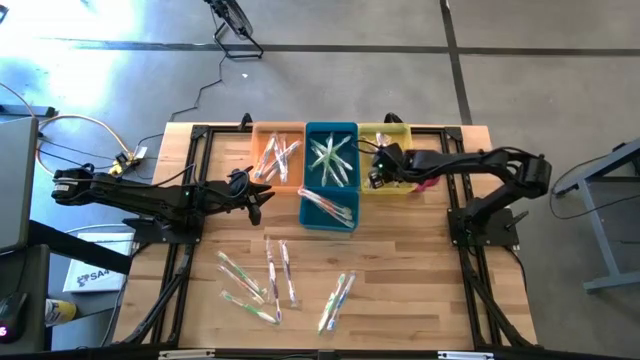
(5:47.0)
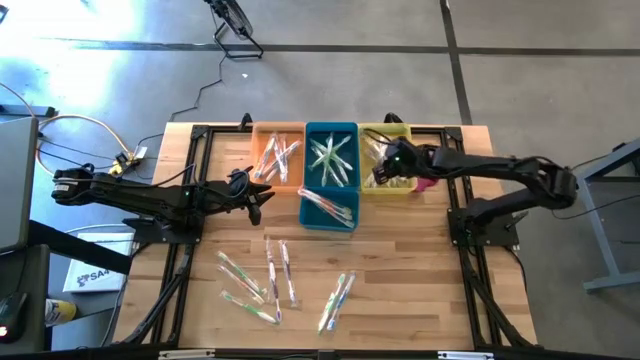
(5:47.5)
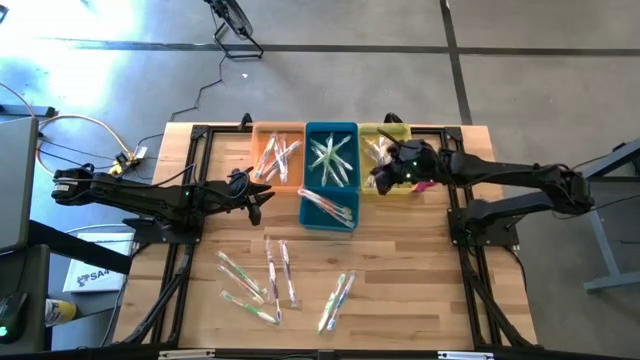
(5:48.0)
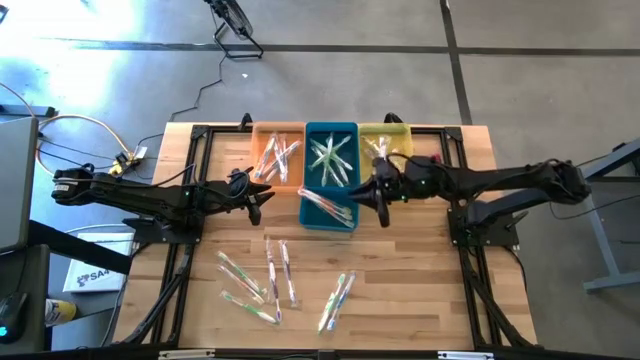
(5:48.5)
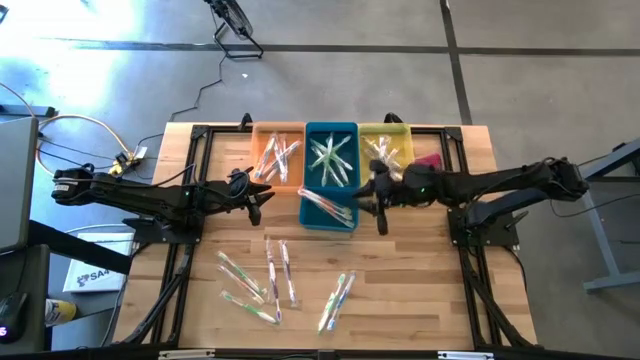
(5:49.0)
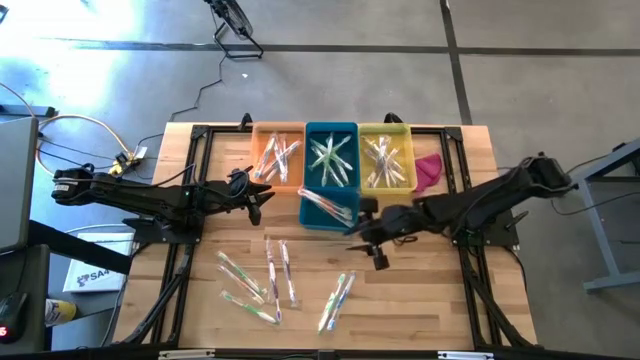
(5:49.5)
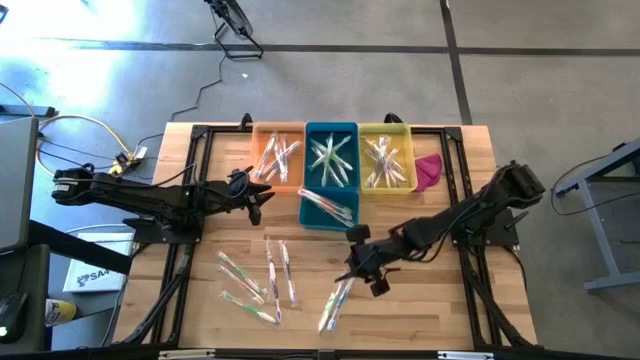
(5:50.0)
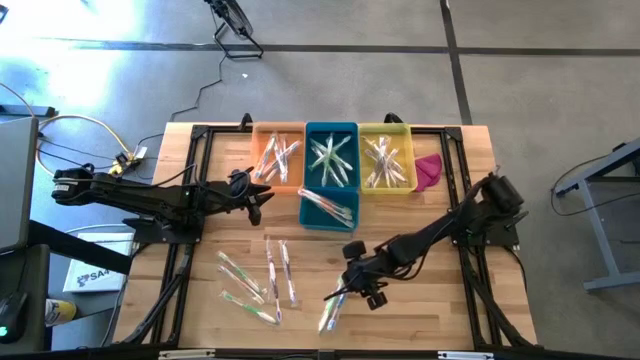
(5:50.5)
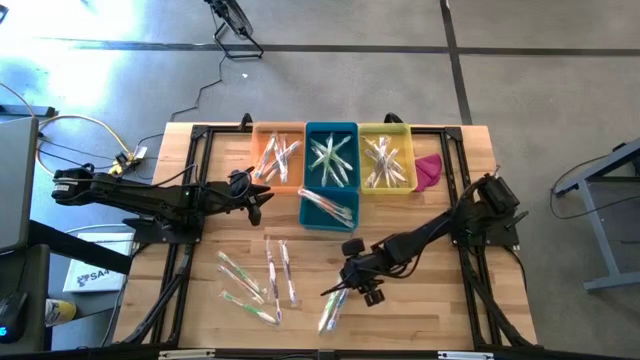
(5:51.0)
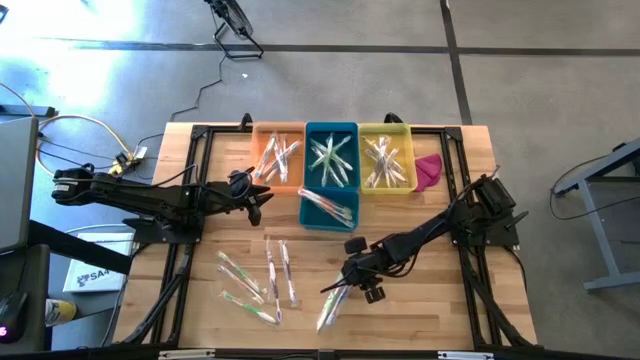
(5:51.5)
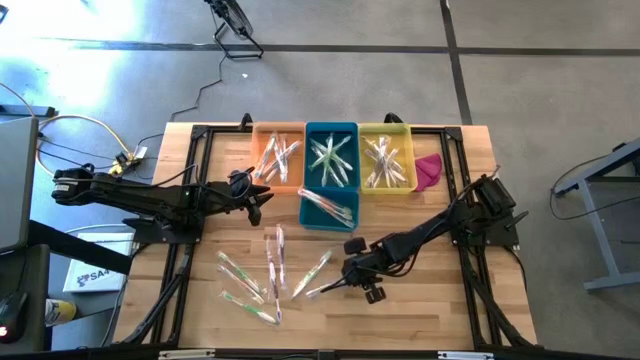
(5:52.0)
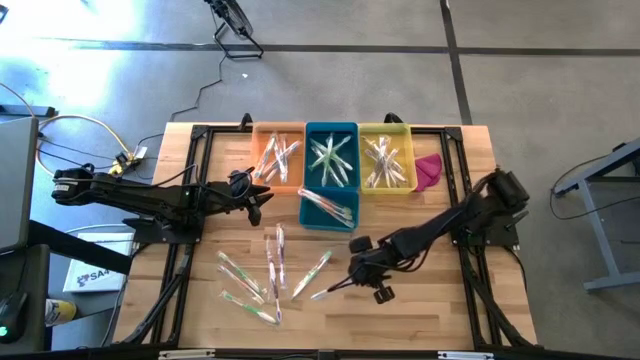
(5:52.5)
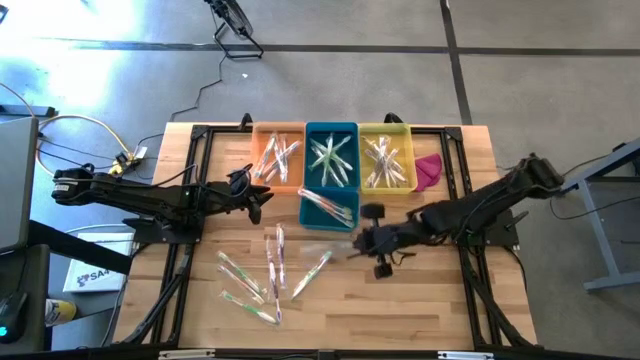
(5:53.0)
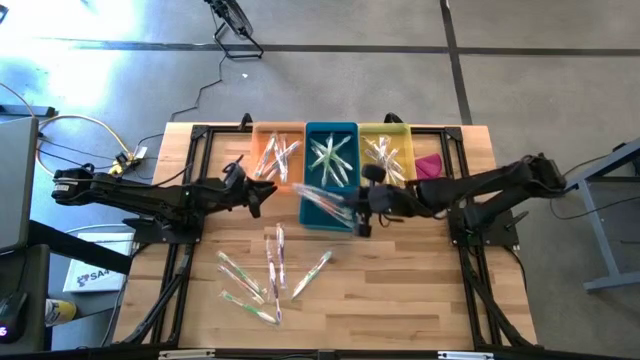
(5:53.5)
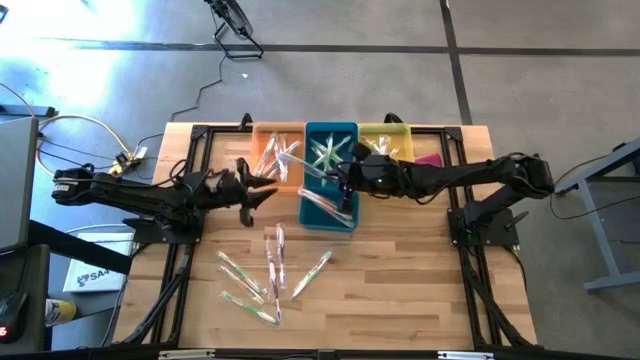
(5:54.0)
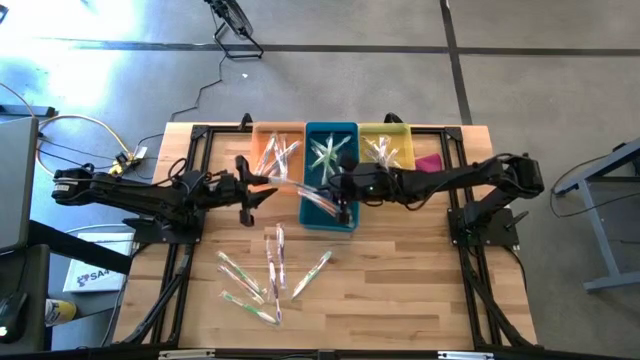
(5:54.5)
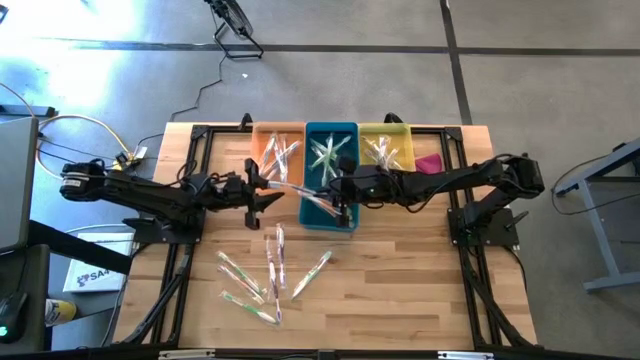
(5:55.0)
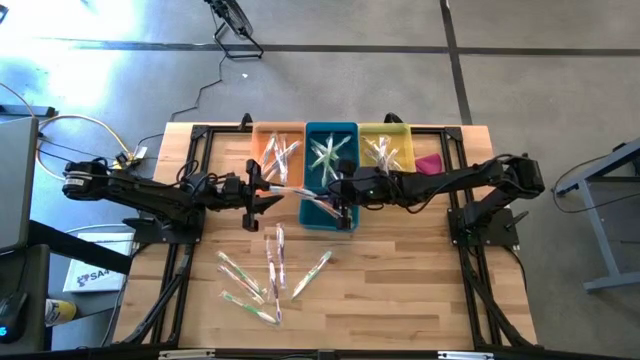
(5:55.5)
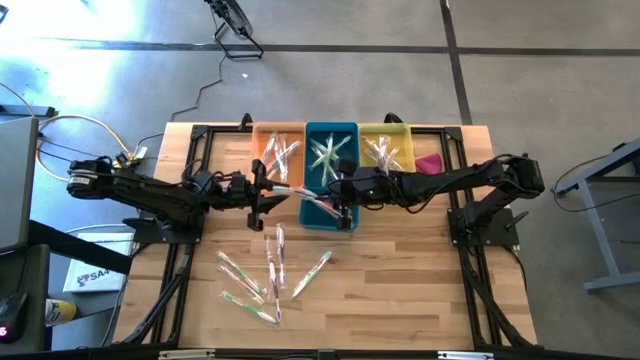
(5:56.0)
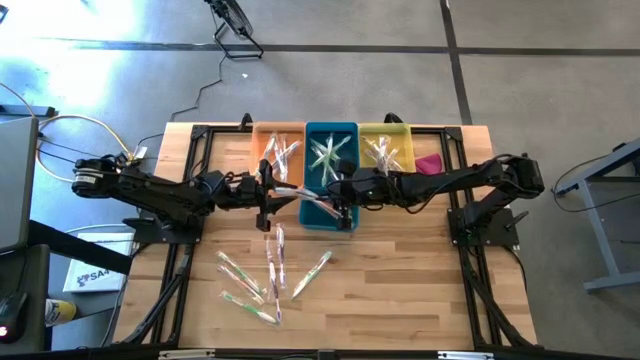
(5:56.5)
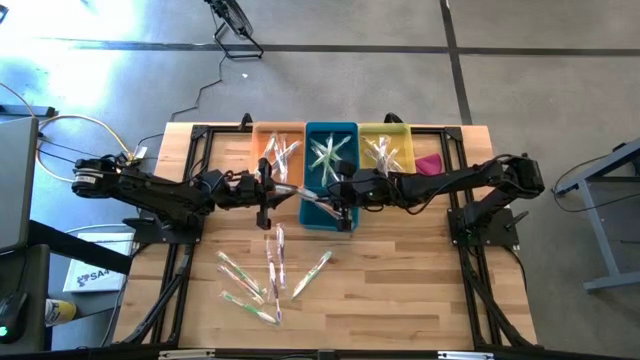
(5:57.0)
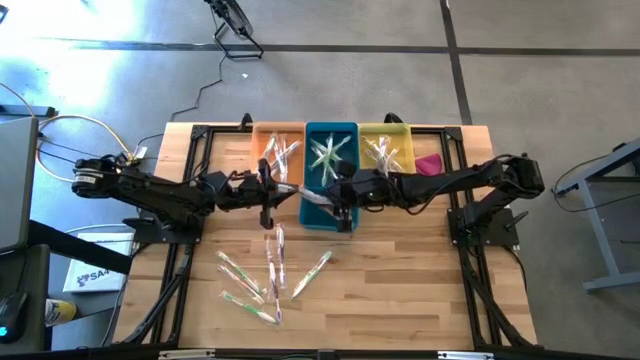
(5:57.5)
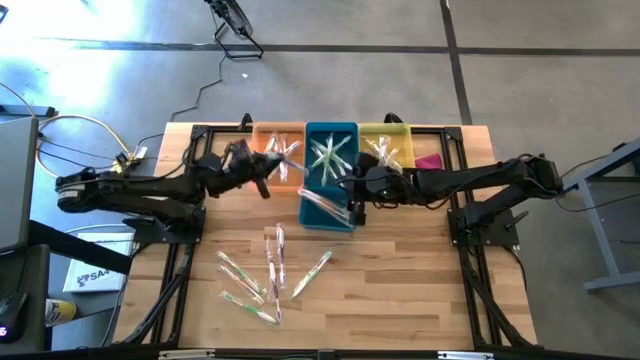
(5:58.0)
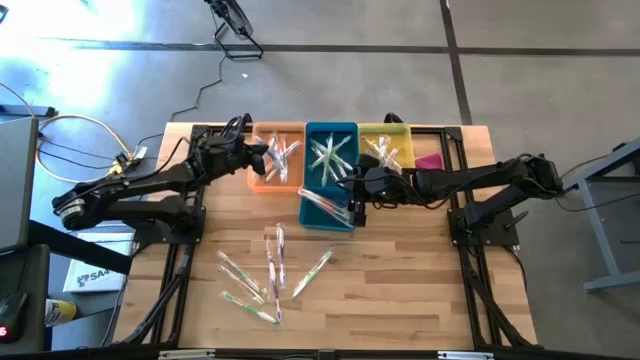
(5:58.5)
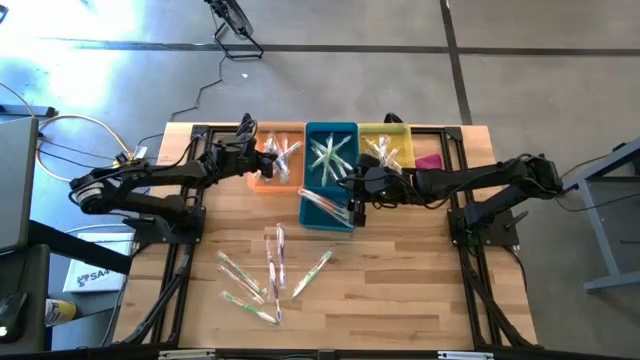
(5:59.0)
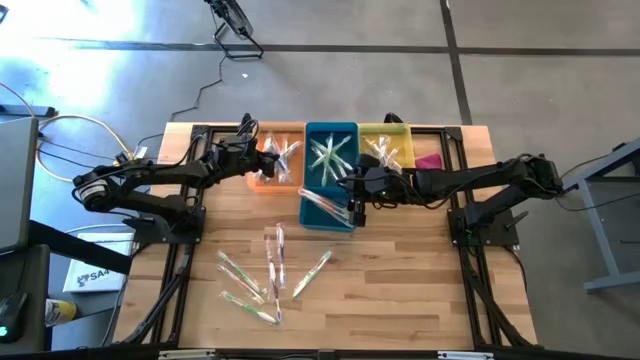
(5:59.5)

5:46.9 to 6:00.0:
Task: Pick & Place Toothbrushes
Put the blue toothbrush into the orange bin

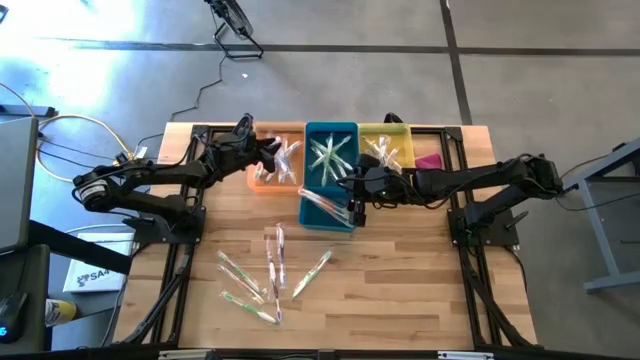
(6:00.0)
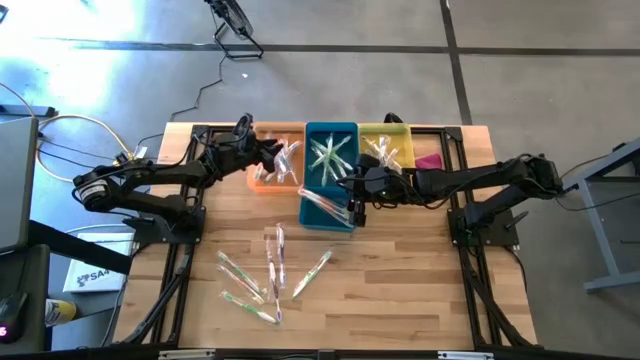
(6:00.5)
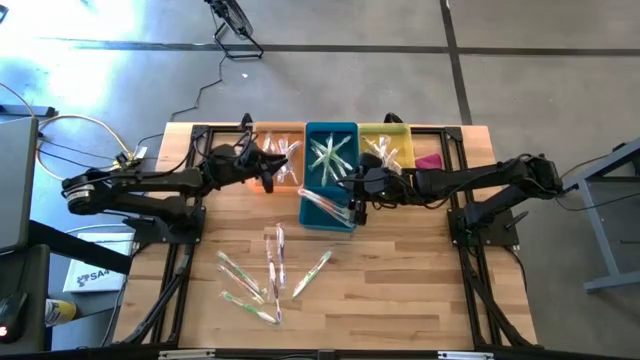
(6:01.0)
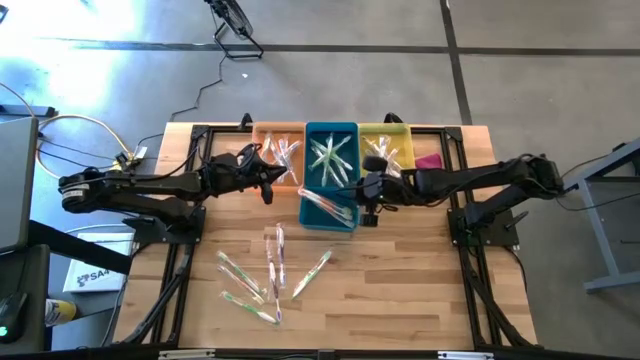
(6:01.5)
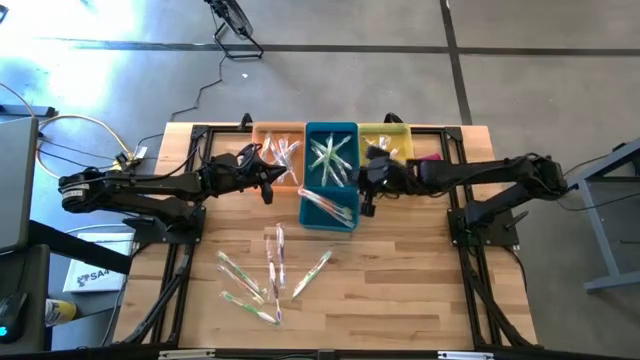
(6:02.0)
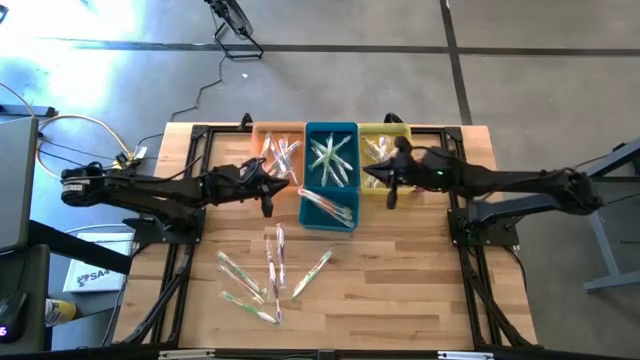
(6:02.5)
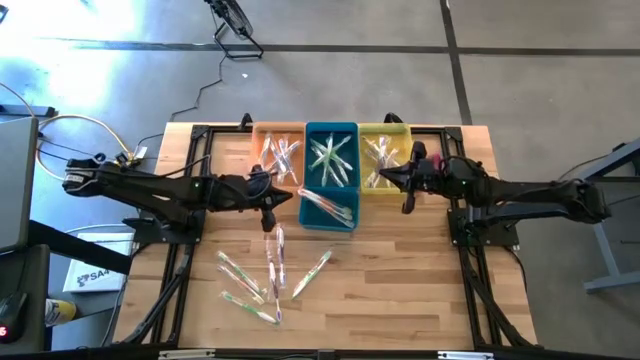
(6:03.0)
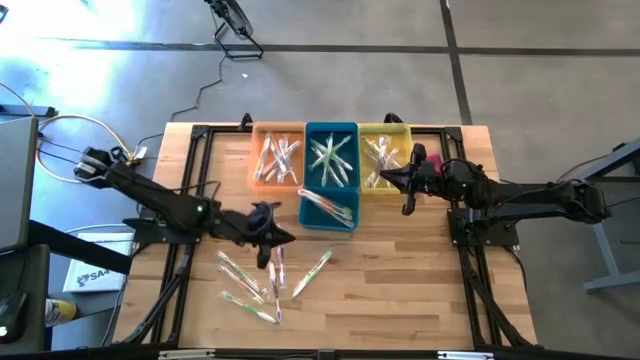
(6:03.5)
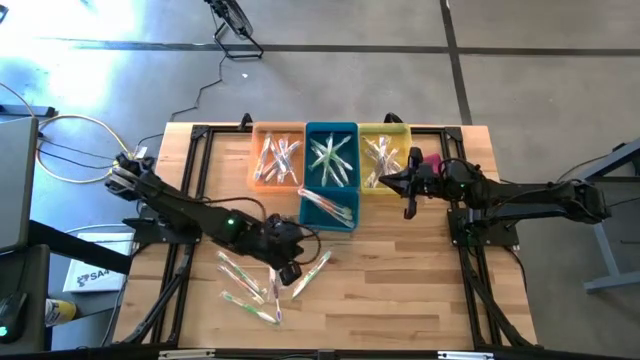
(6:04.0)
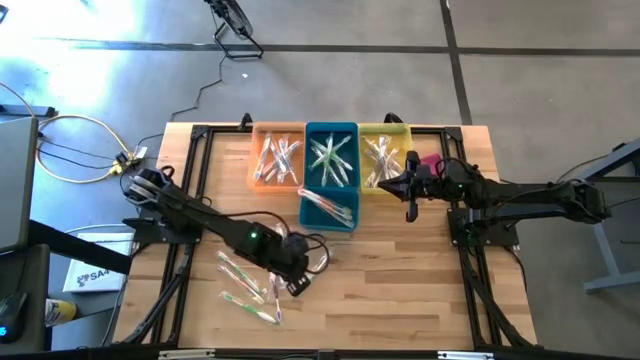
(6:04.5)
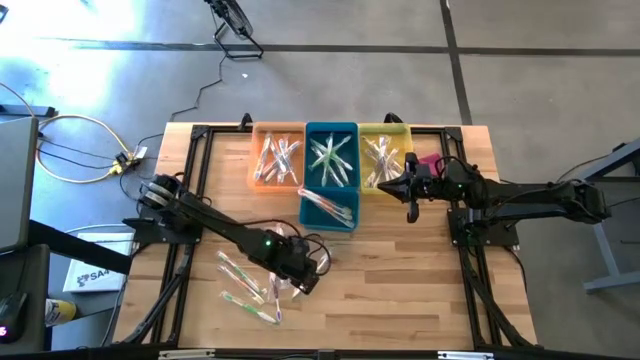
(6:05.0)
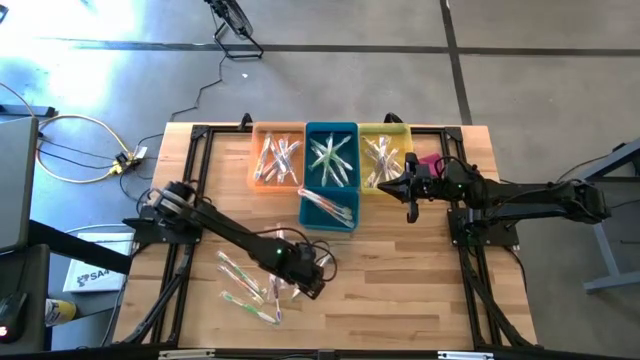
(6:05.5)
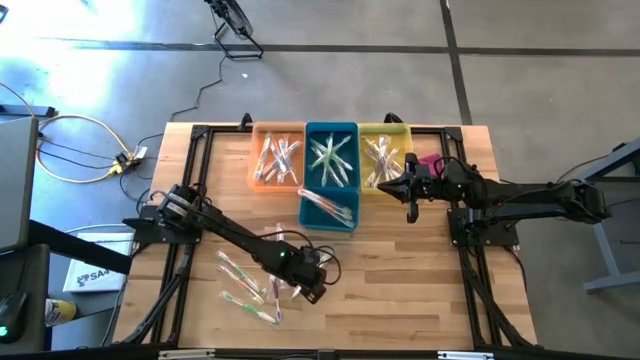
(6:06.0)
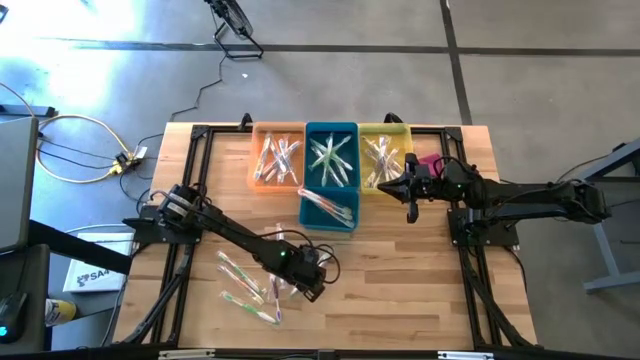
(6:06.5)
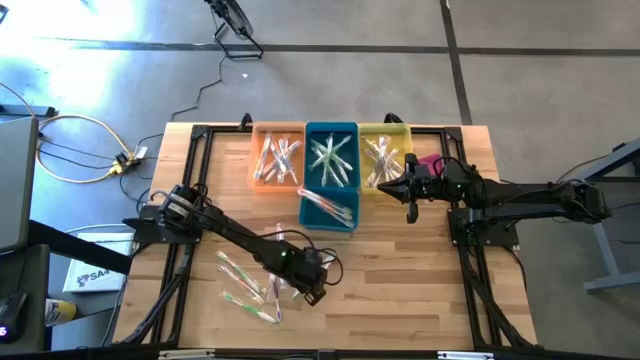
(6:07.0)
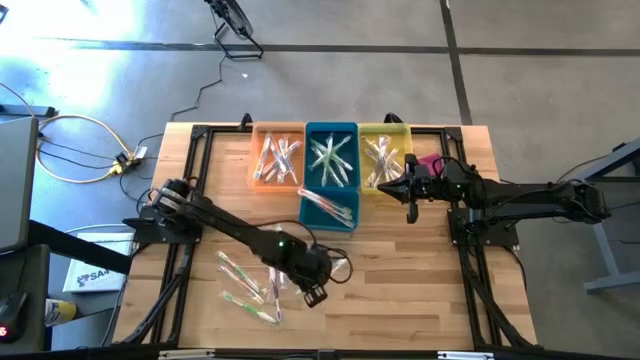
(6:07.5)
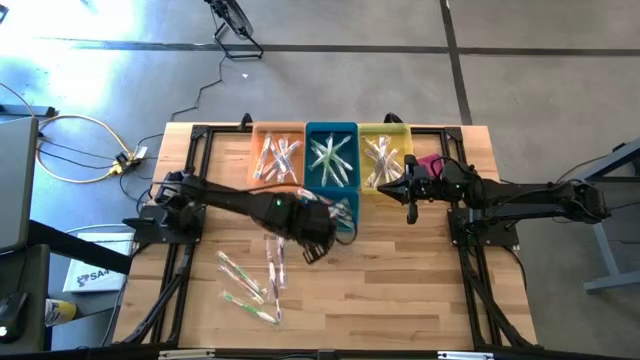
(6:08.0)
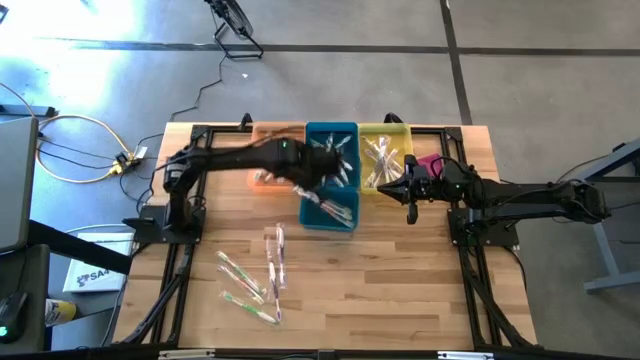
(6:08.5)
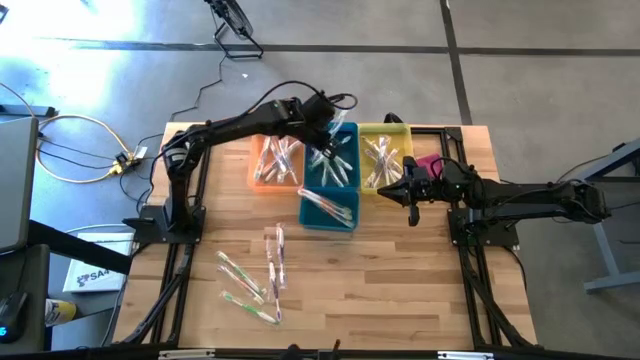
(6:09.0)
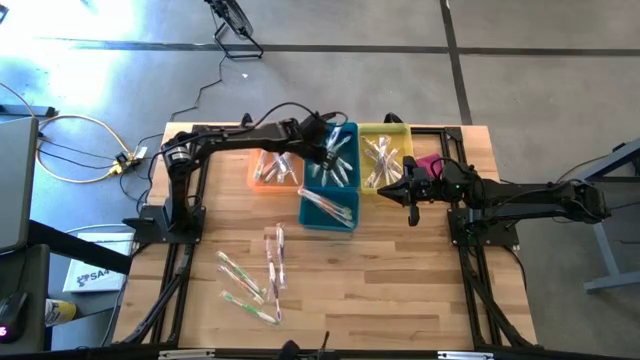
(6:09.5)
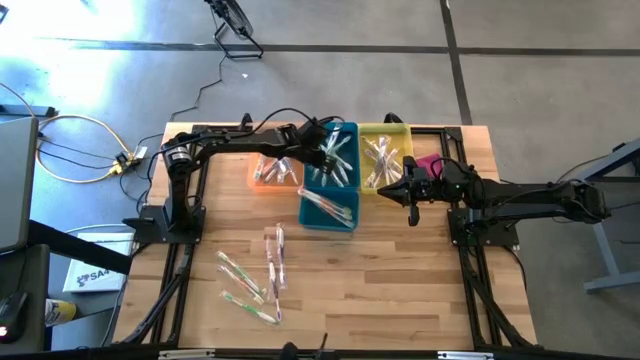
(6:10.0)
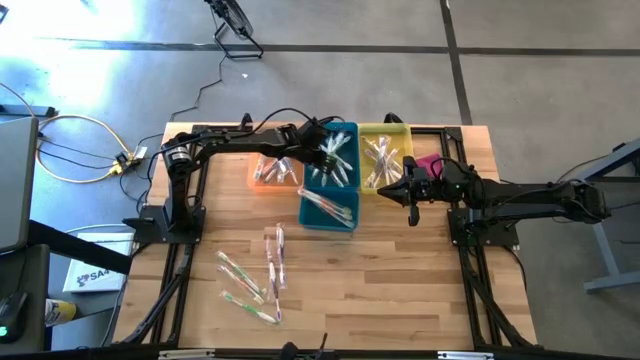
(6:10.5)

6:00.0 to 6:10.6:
Put the green toothbrush into the top blue bin
